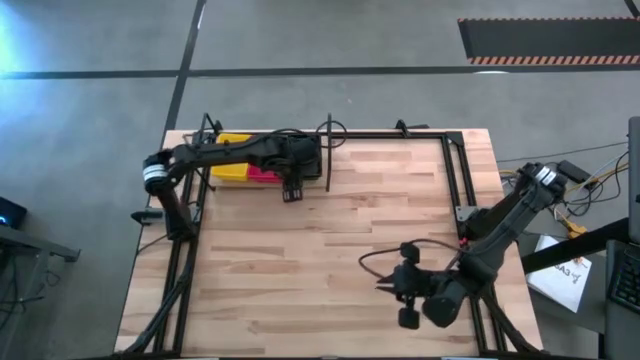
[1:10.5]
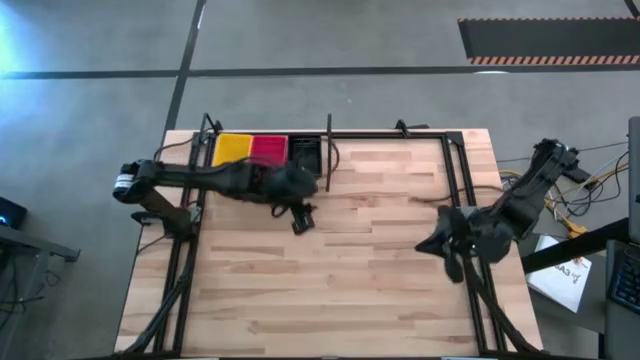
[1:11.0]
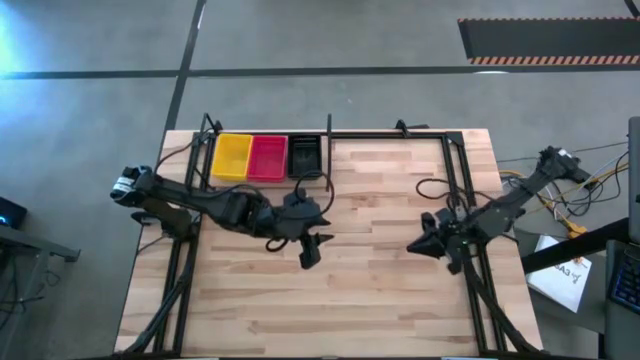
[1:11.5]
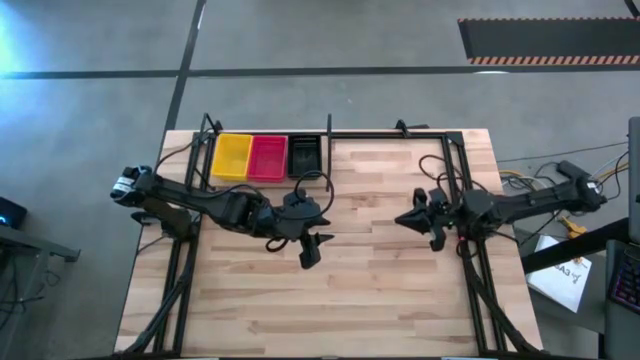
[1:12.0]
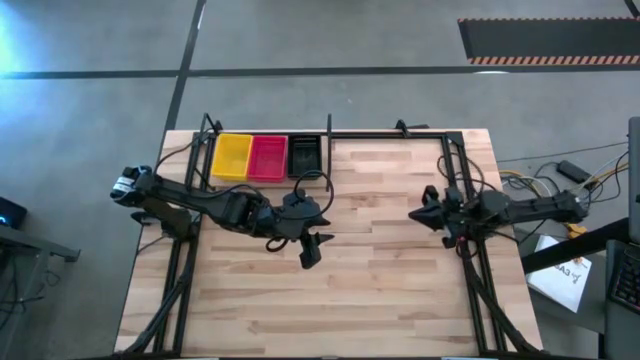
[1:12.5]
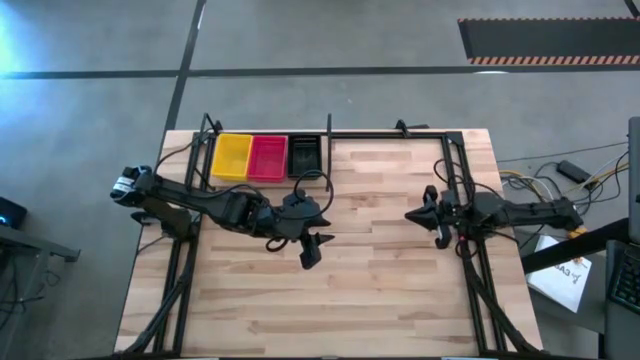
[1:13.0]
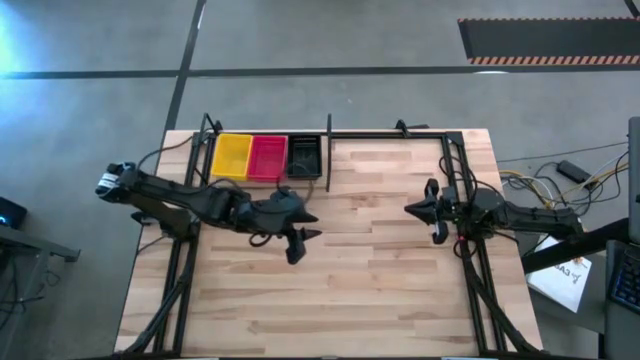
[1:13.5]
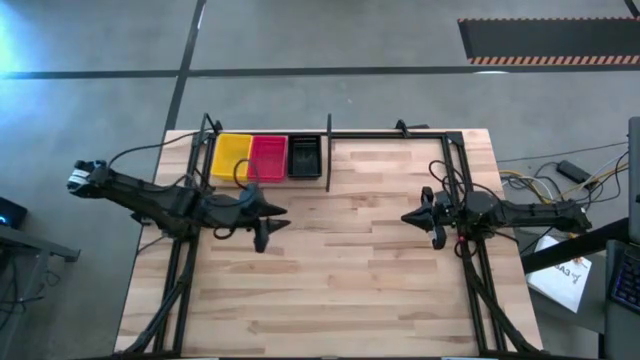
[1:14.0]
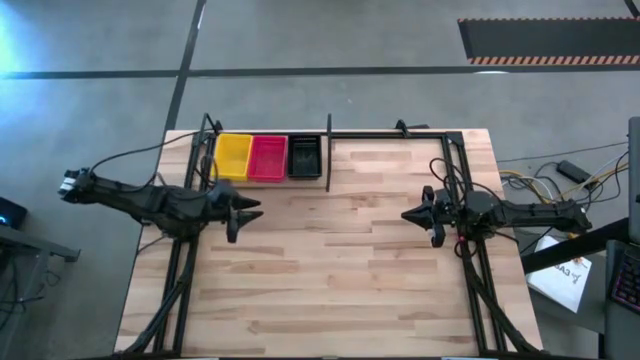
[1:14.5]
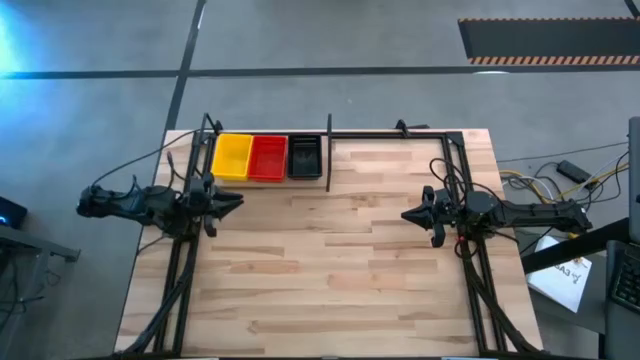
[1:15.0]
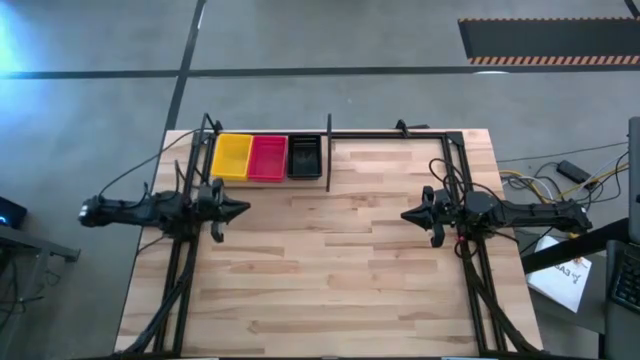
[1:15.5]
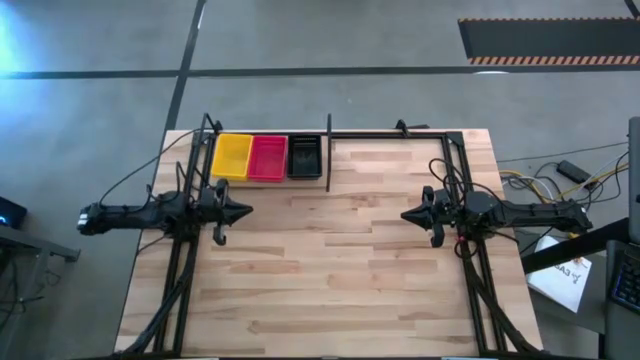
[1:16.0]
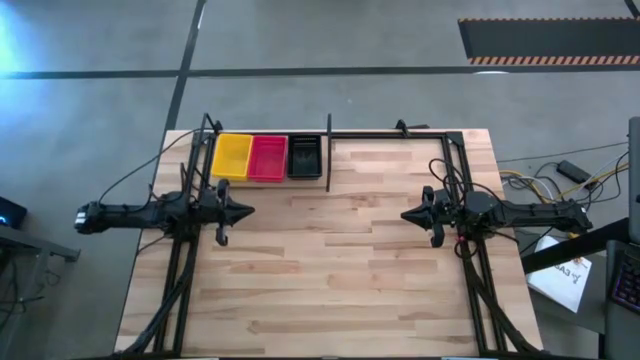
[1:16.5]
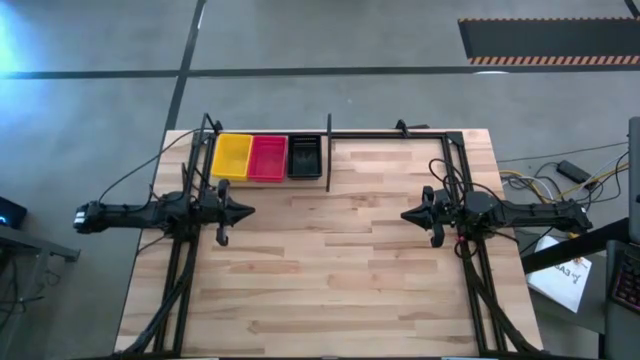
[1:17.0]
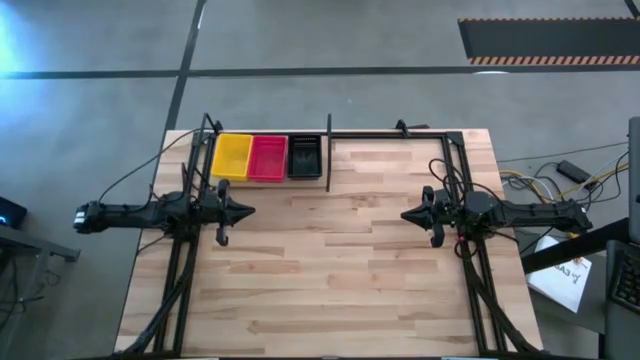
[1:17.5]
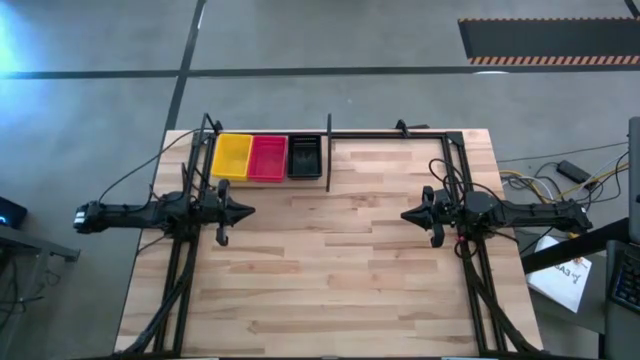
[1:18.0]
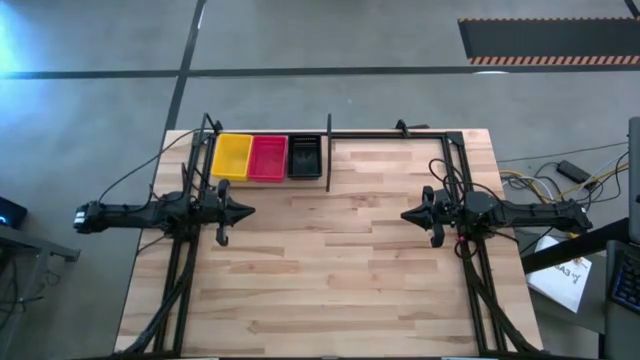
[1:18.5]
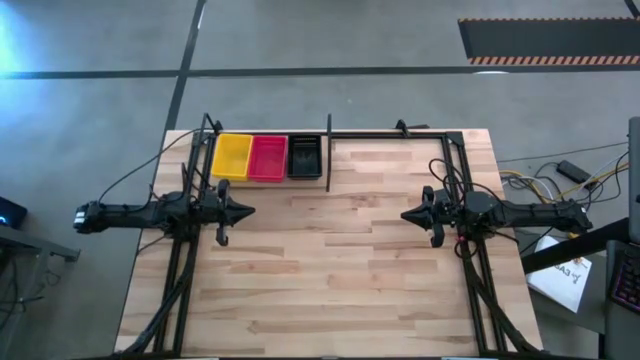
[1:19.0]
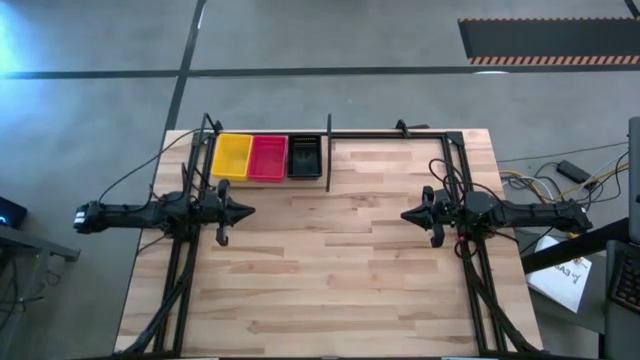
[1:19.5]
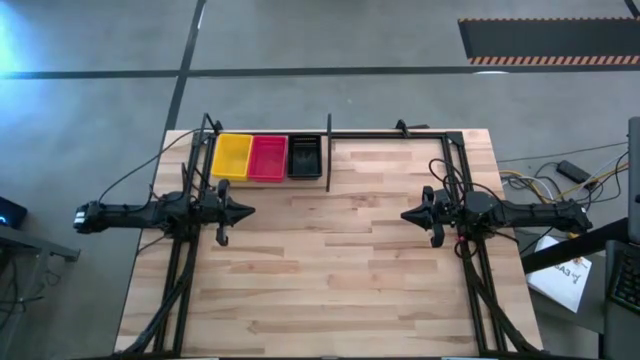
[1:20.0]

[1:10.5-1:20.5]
Task: Stack baskets on shelf by color
Return to Home Position

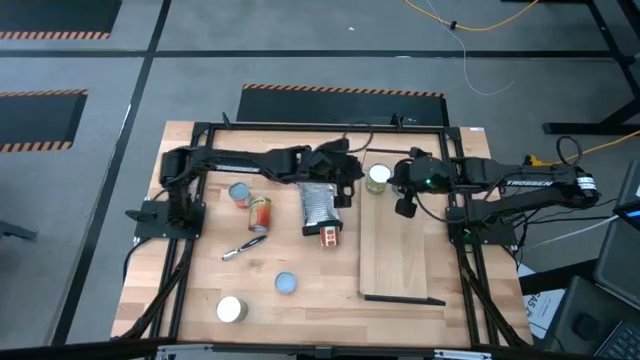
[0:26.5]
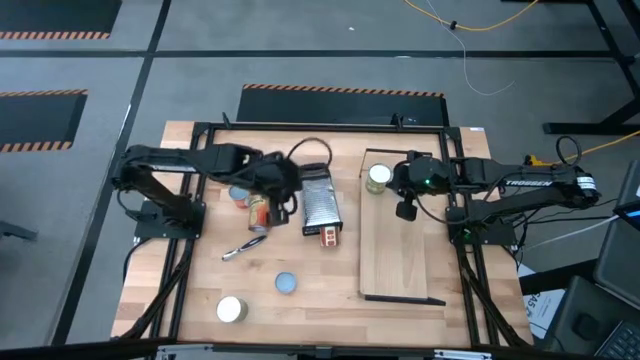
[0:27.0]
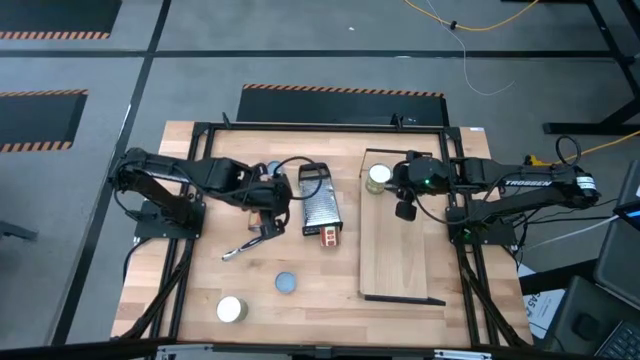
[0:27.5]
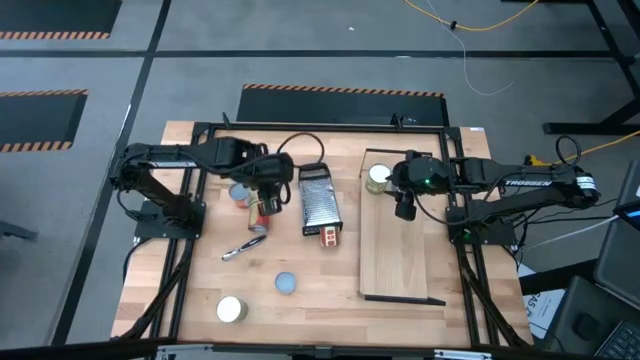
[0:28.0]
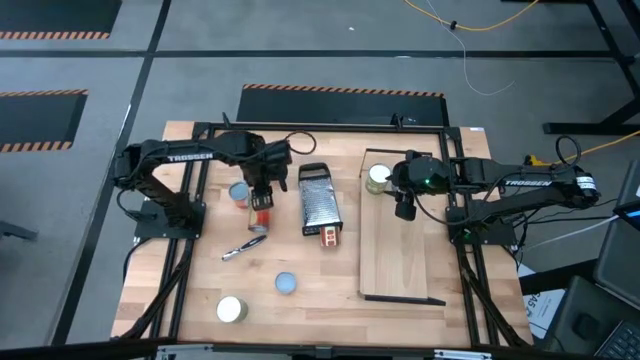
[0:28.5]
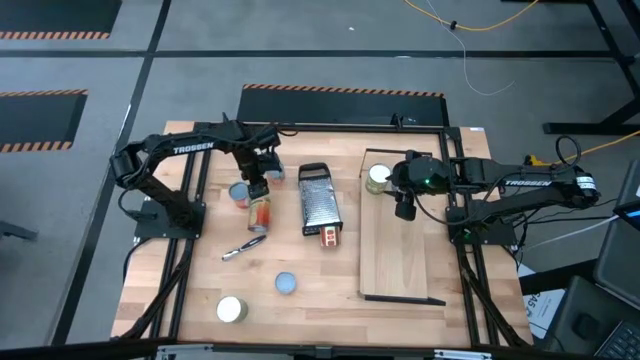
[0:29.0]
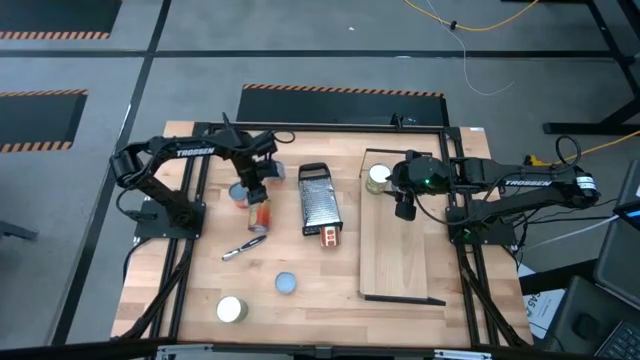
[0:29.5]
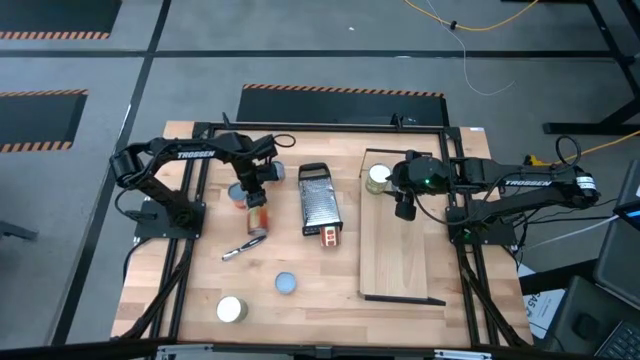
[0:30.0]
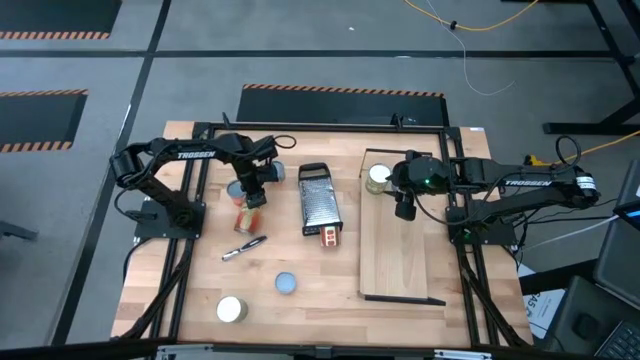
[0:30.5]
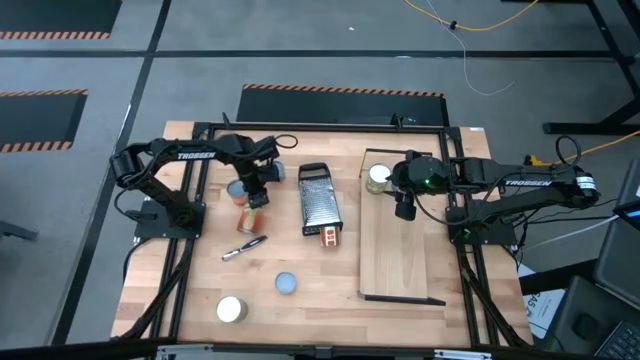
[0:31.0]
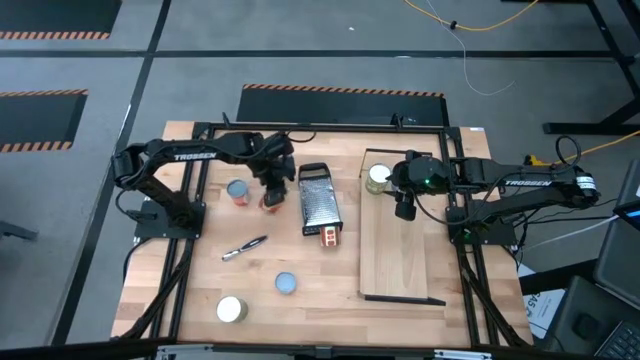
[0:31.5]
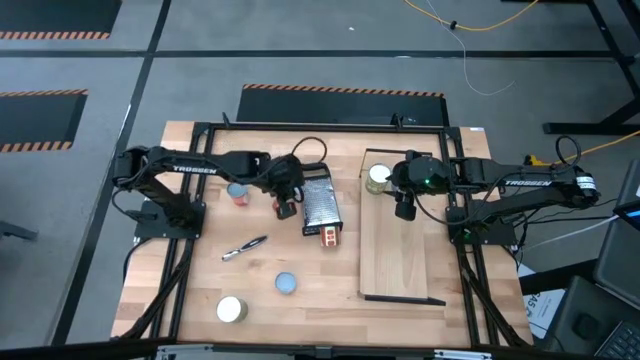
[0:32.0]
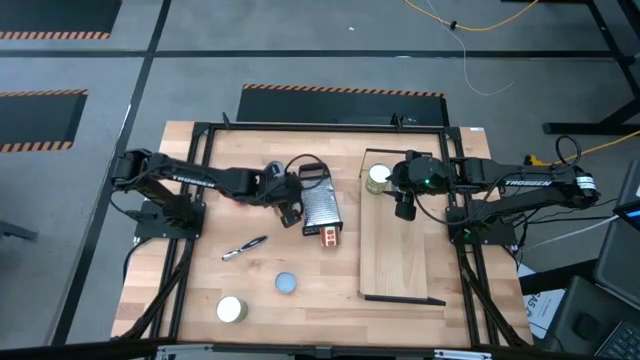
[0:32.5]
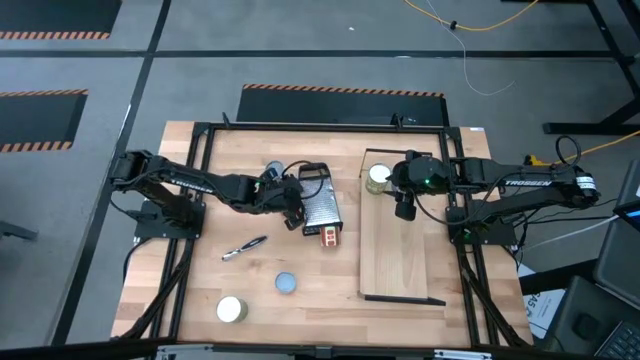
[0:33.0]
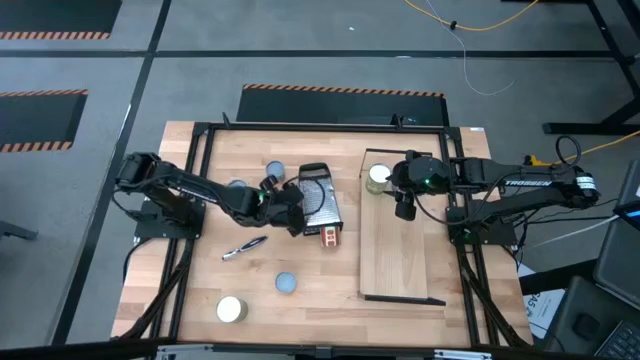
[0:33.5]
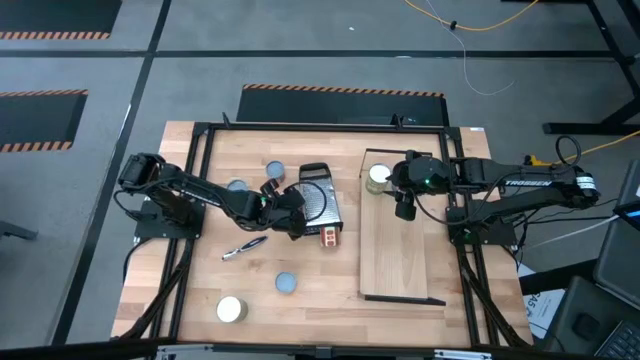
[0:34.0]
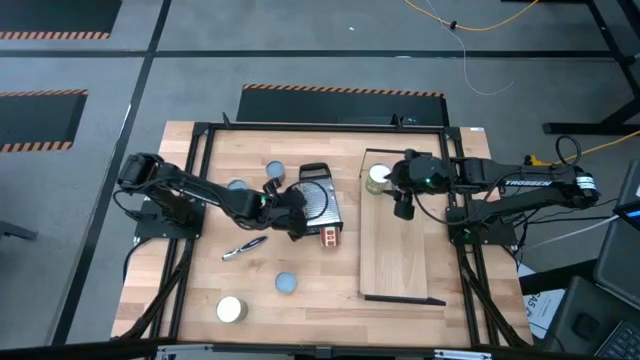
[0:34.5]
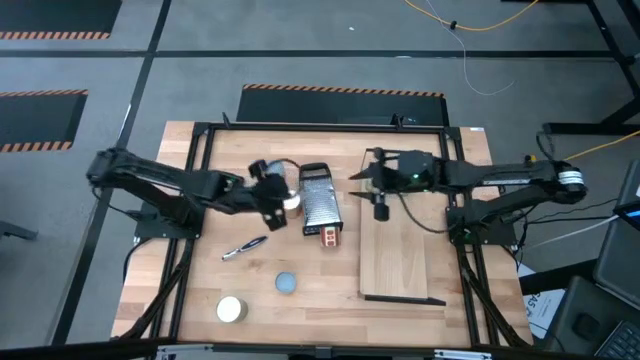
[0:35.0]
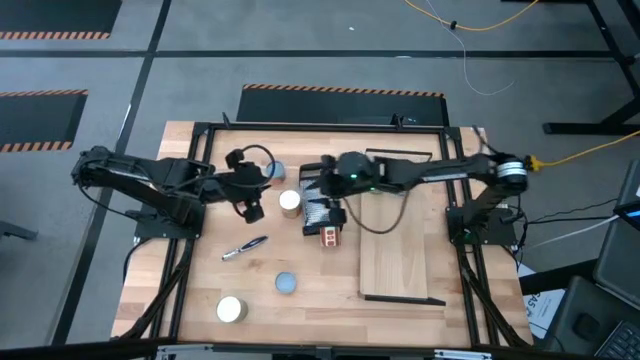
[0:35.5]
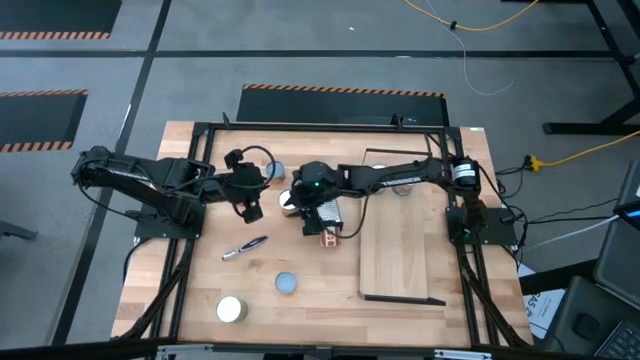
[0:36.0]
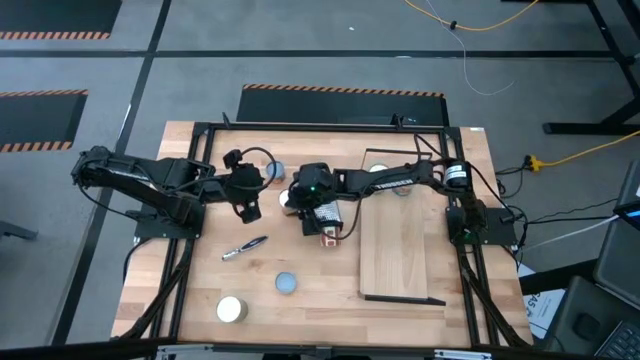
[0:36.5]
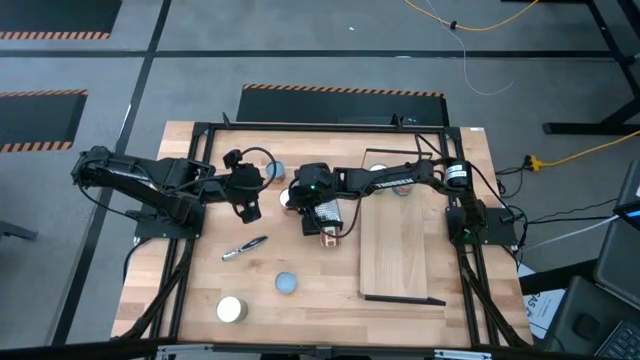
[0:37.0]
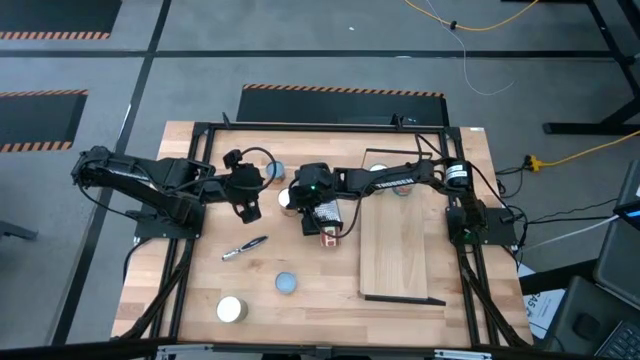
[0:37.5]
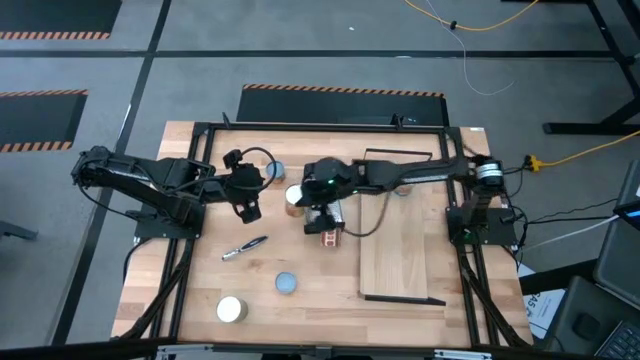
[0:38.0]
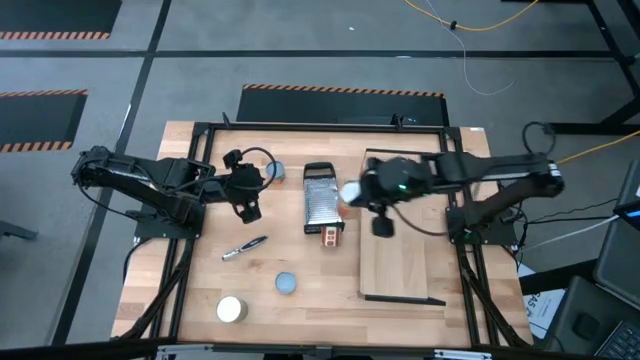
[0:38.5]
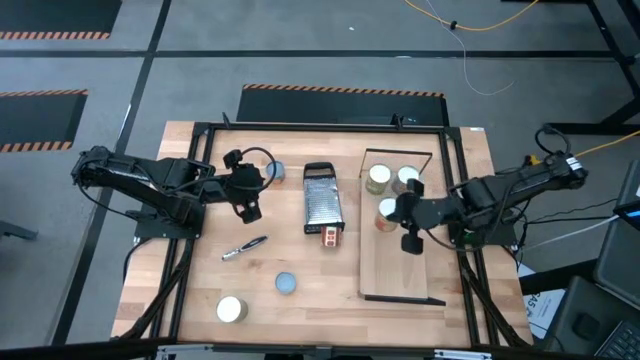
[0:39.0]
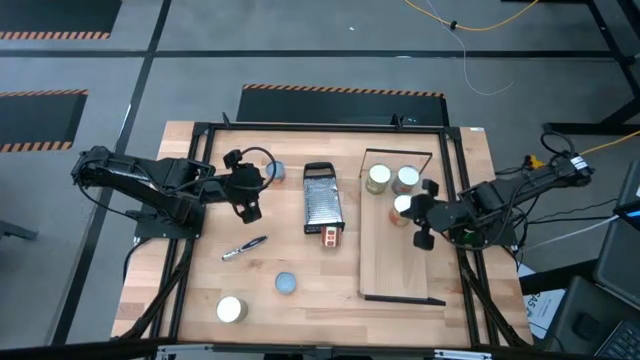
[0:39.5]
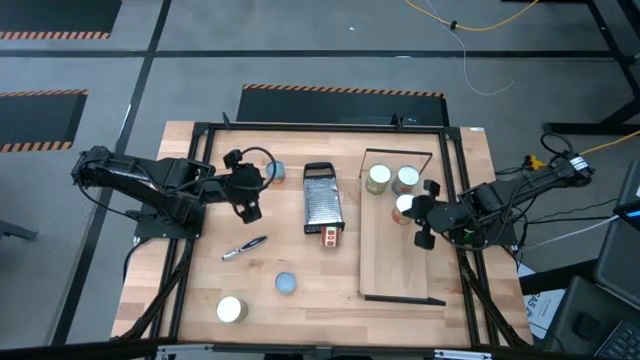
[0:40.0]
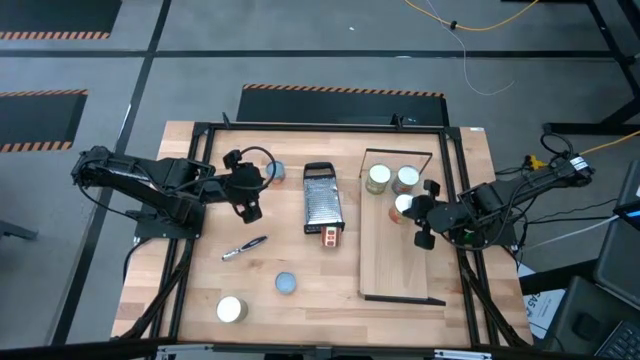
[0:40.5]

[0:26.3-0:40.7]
Task: Pick and place cans onto a shelf
Put the canned pineapple on the shelf
